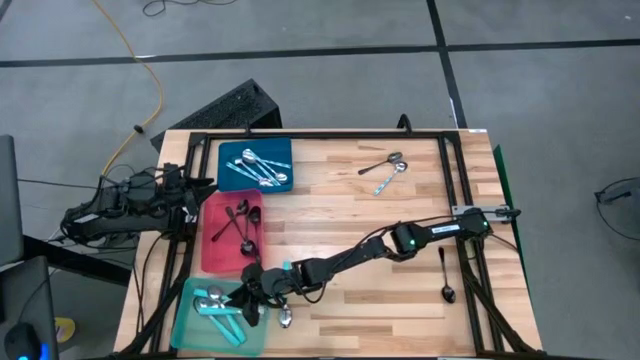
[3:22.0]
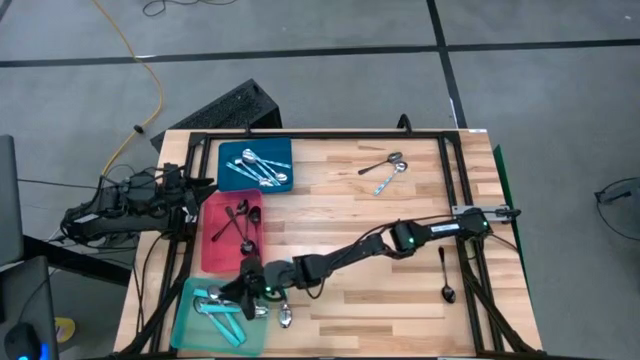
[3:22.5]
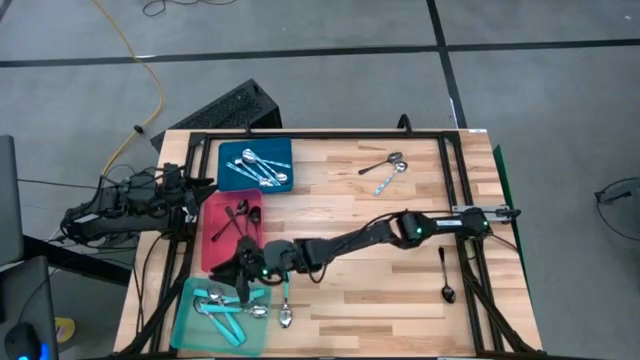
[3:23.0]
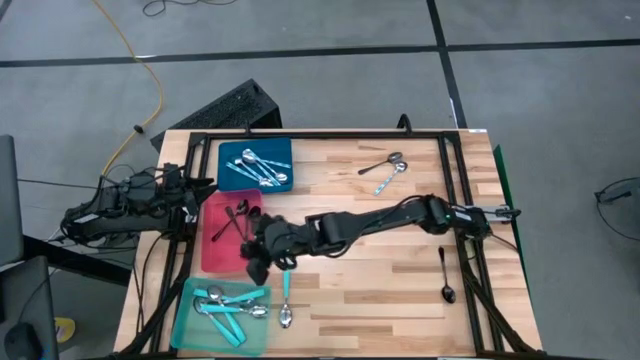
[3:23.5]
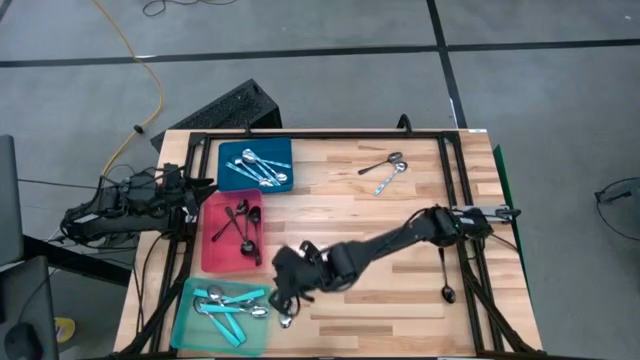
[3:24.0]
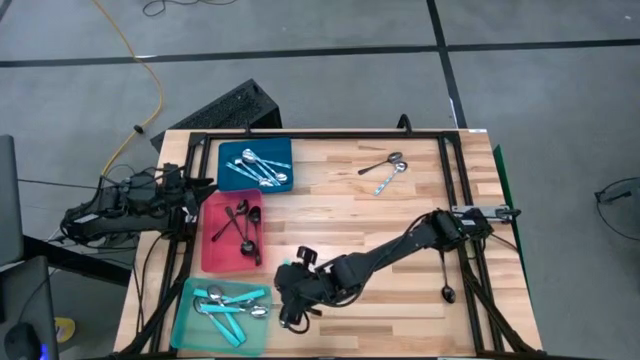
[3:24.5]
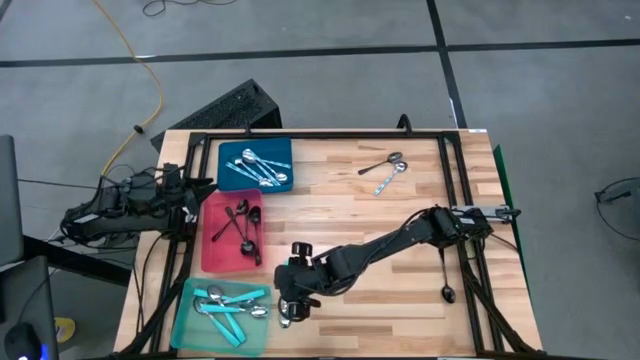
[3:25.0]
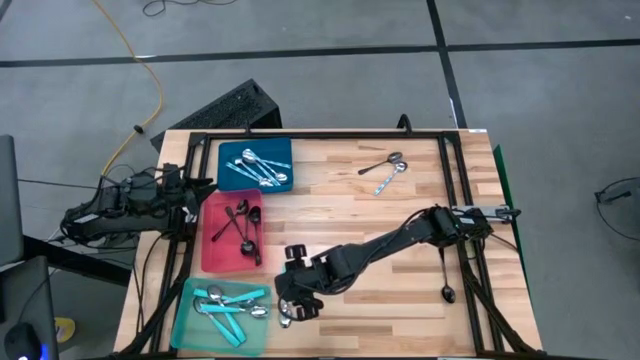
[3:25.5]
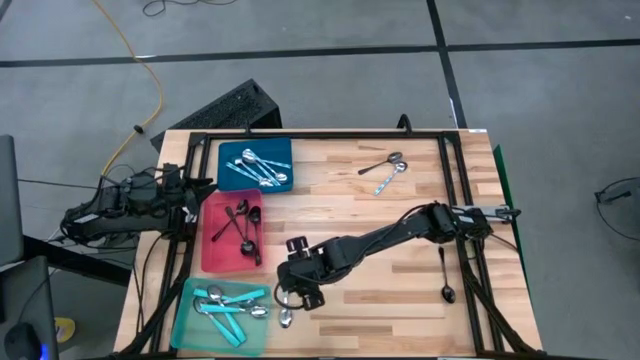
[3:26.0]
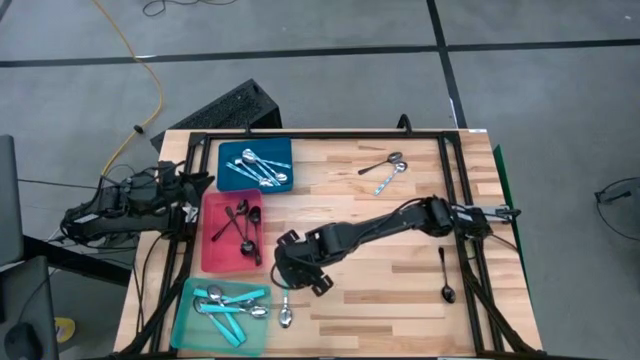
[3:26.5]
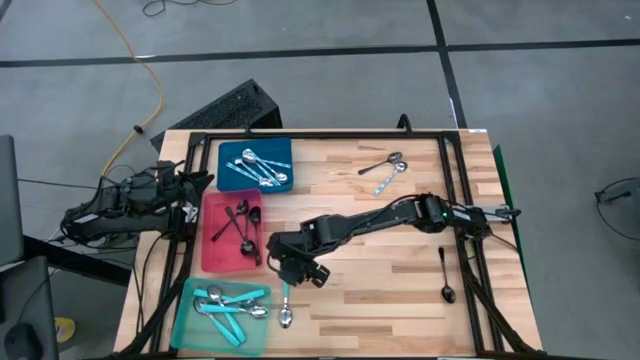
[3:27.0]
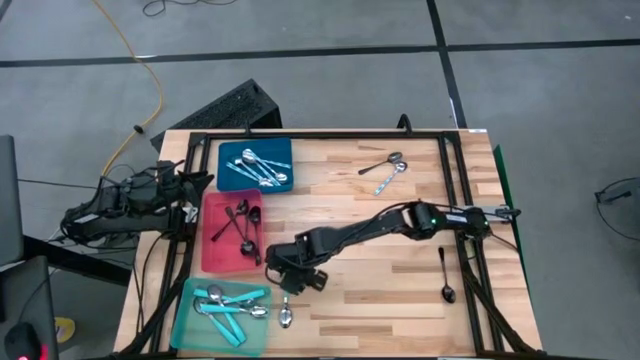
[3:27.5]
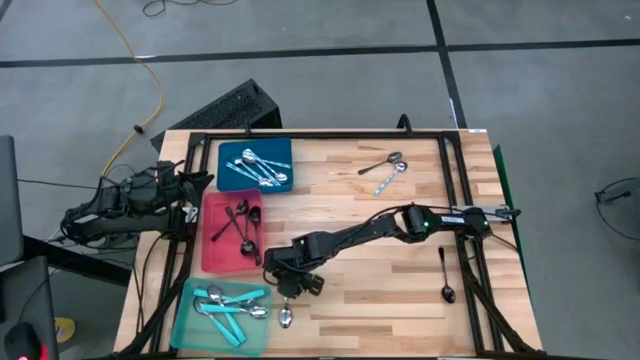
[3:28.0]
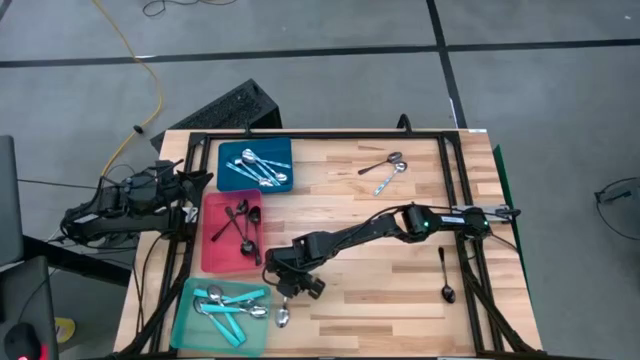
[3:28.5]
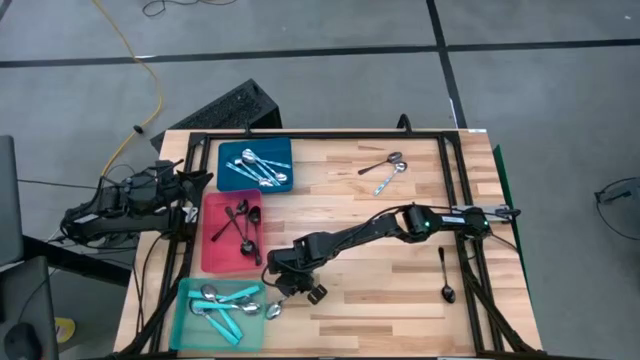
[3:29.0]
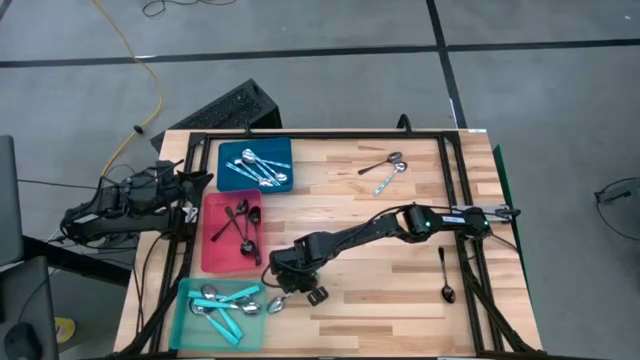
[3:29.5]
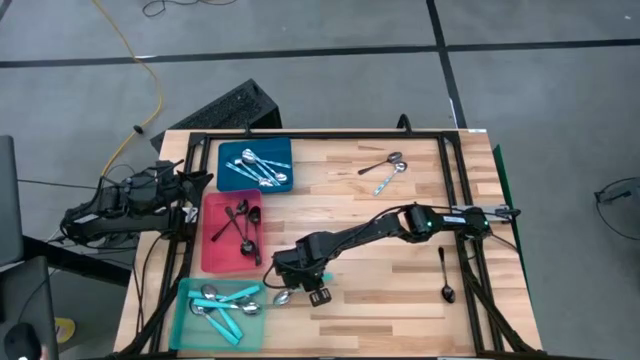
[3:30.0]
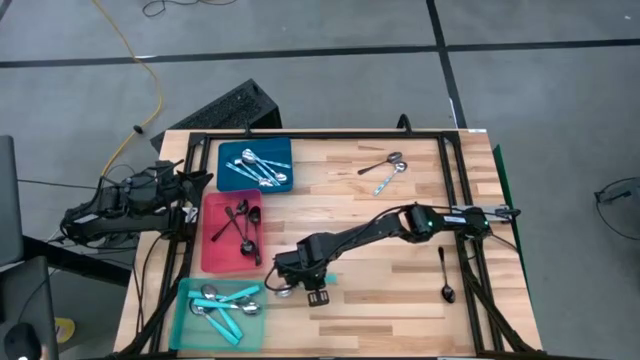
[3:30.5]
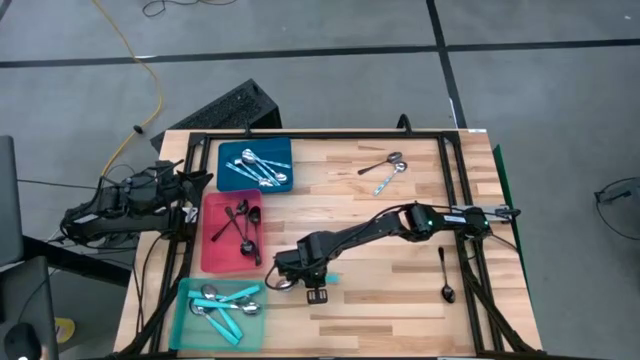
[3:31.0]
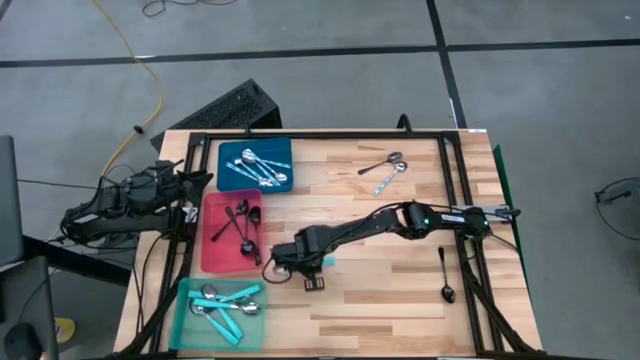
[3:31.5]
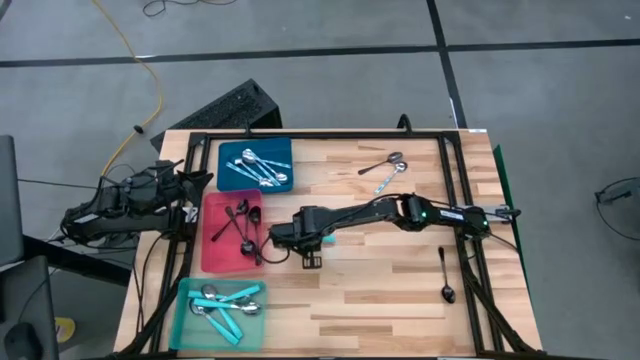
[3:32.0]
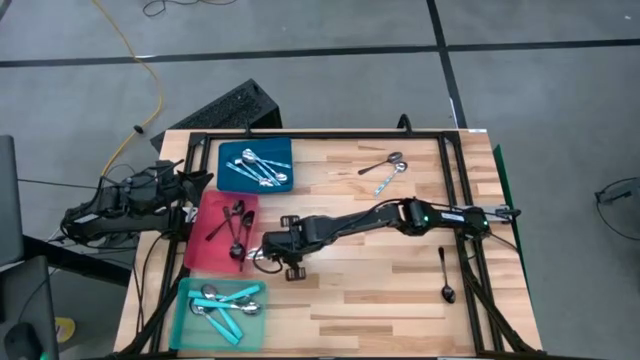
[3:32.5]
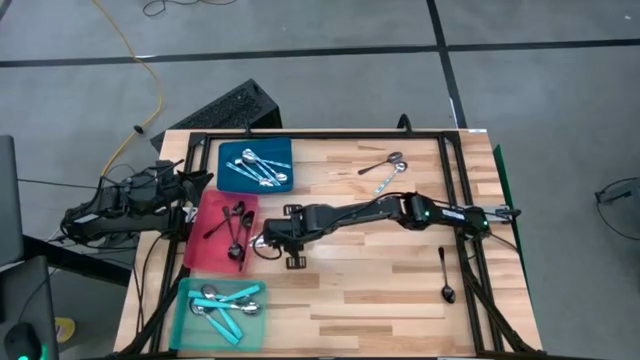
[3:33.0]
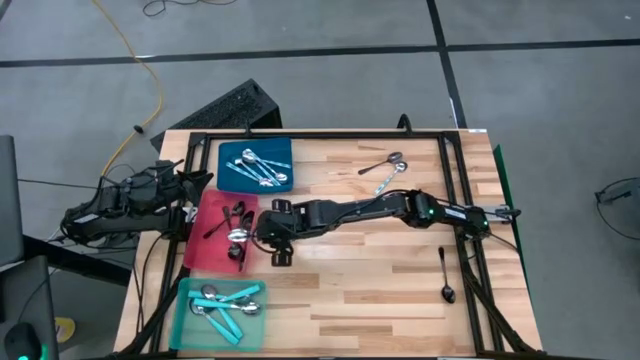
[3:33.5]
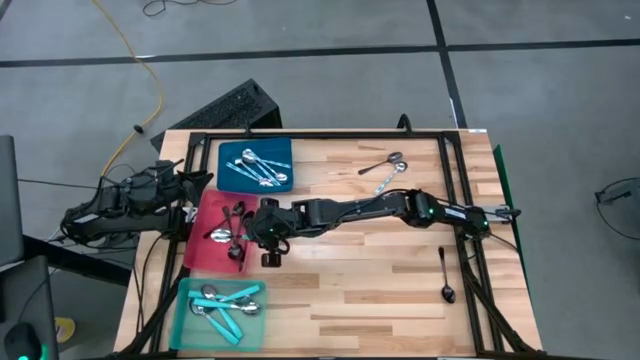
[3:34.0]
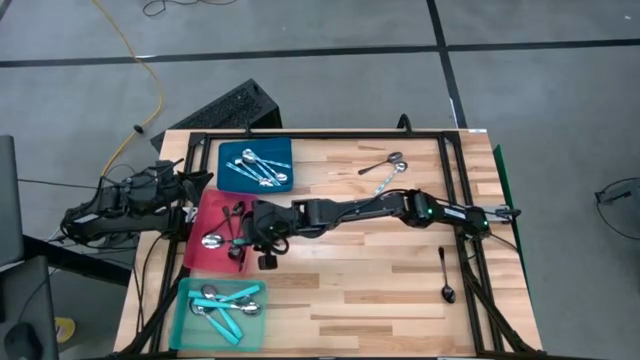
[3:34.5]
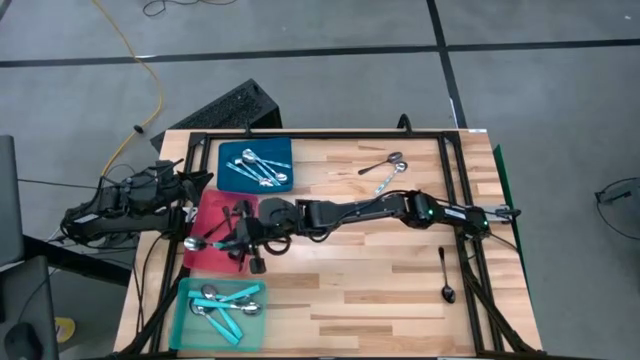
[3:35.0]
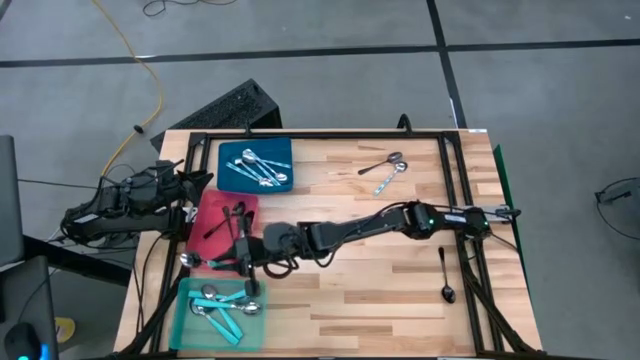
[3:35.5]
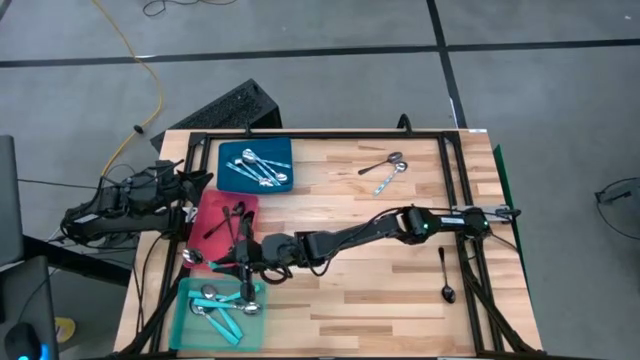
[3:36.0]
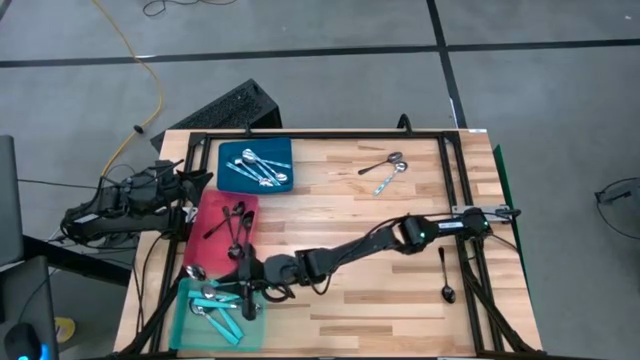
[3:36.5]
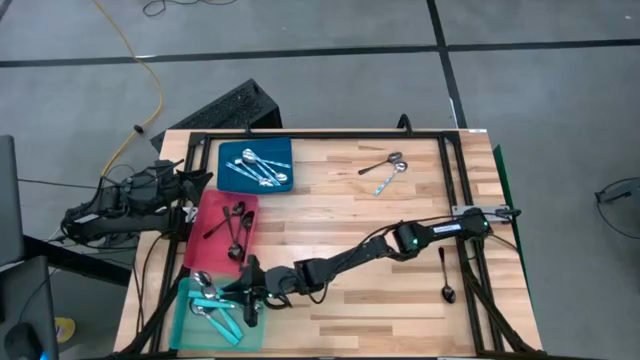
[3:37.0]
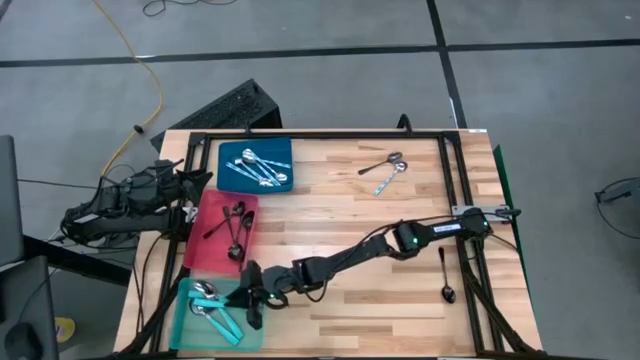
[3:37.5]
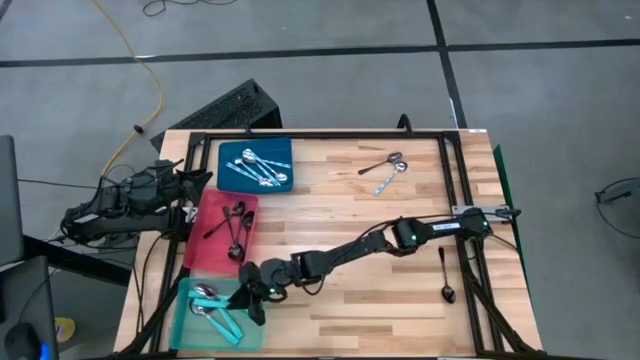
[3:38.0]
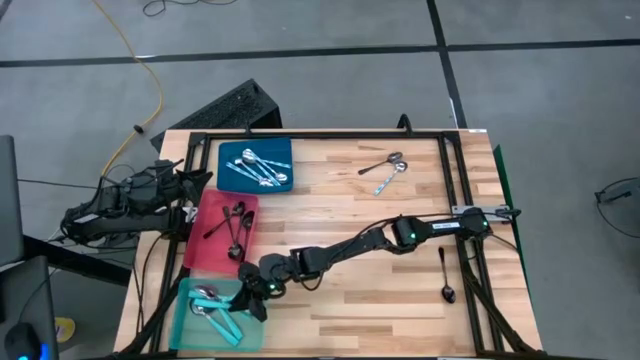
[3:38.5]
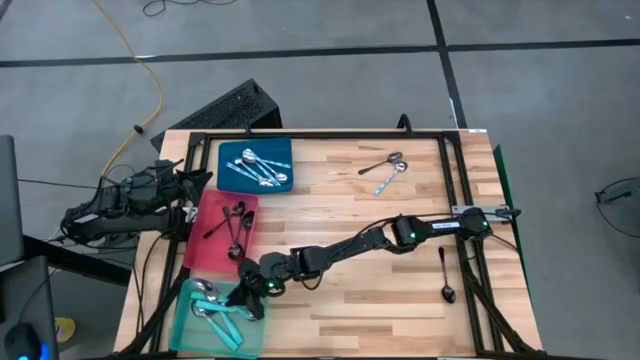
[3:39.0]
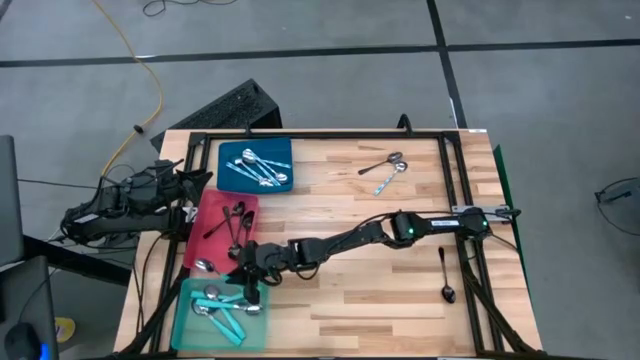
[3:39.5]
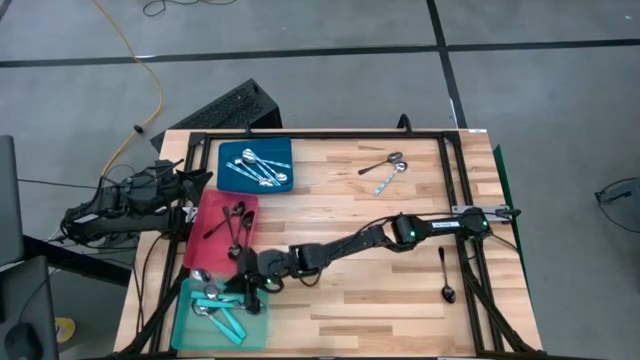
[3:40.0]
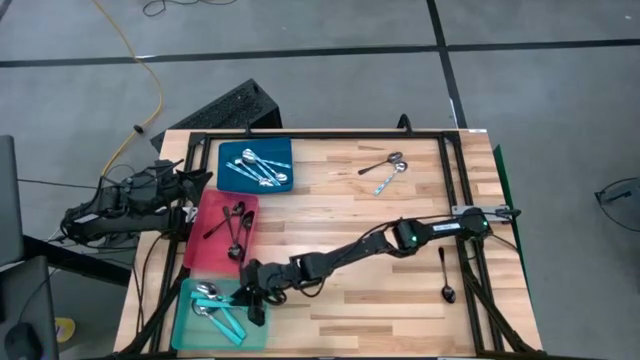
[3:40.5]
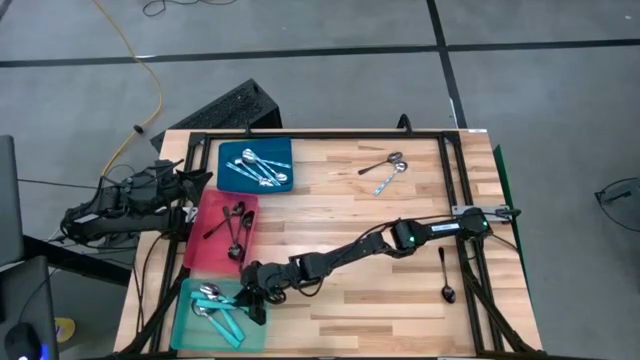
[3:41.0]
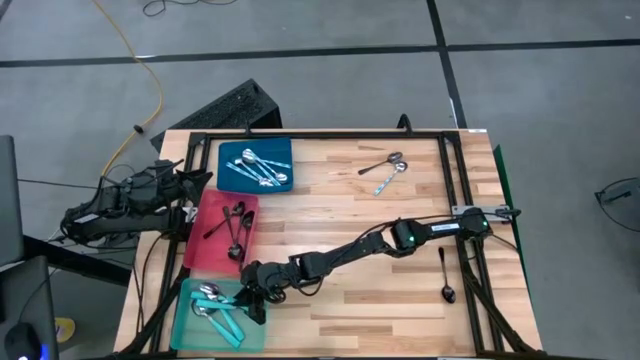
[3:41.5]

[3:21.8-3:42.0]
Task: Sort silverware by color (type)
Put the light blue spoon into the light blue bin
